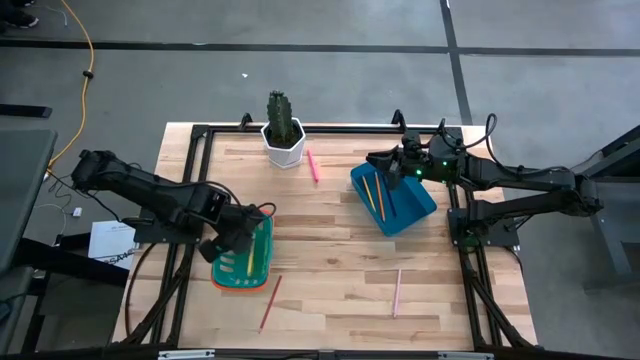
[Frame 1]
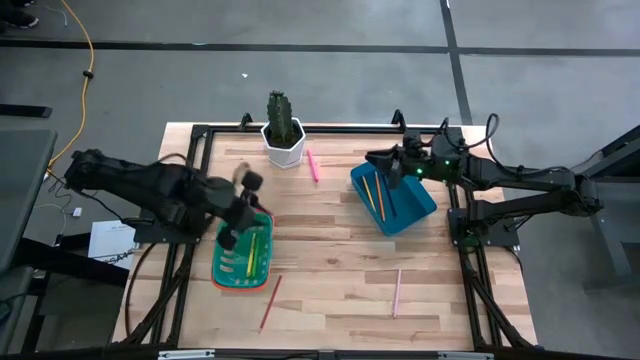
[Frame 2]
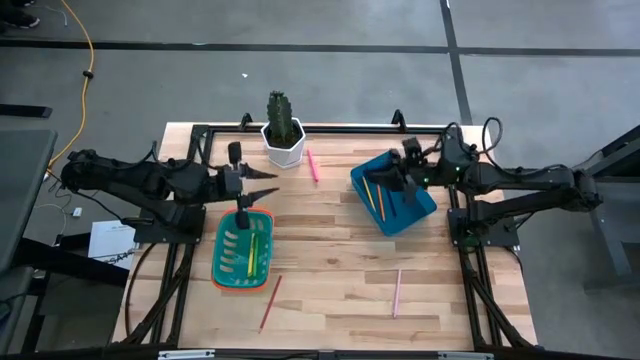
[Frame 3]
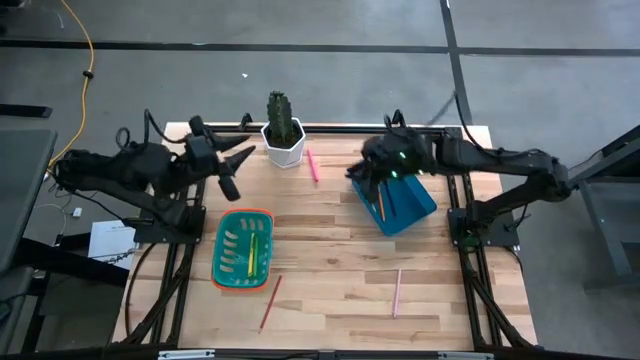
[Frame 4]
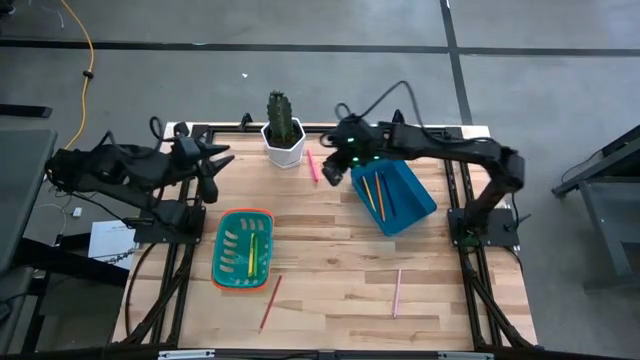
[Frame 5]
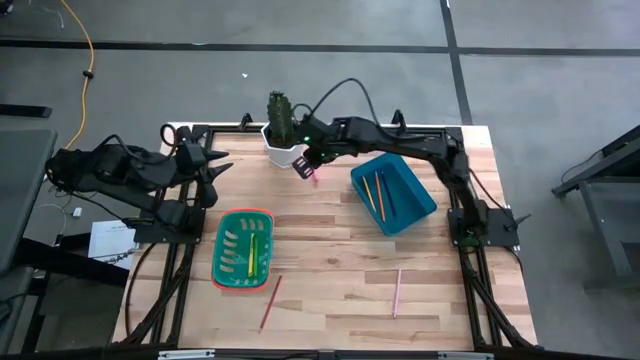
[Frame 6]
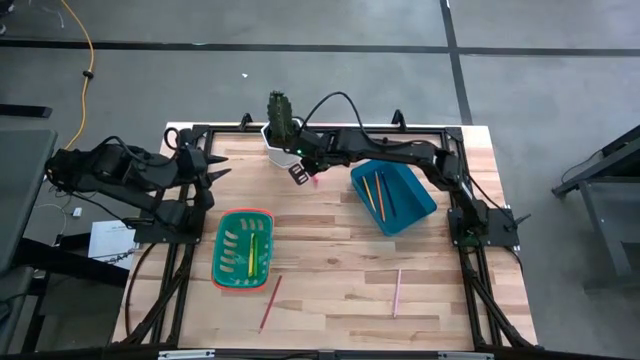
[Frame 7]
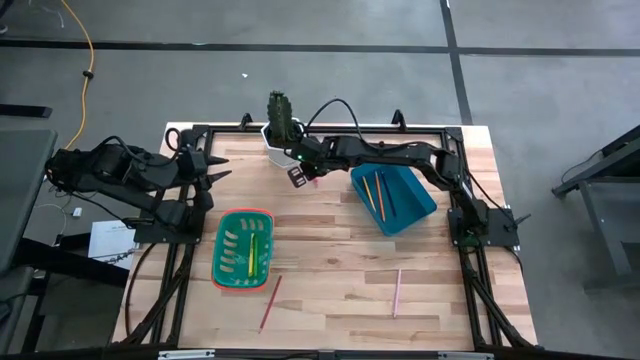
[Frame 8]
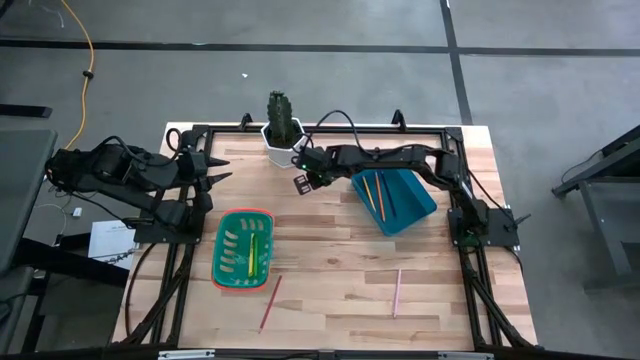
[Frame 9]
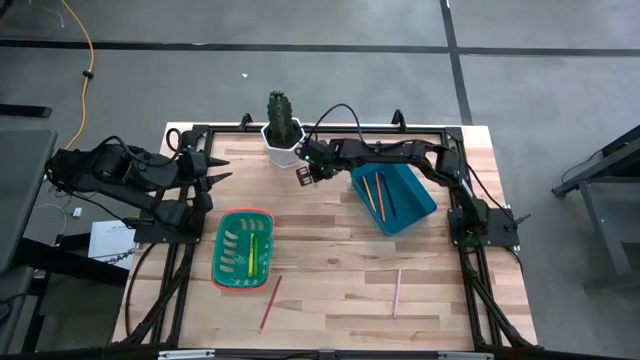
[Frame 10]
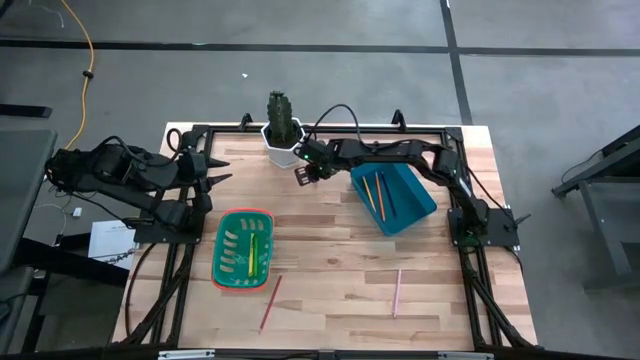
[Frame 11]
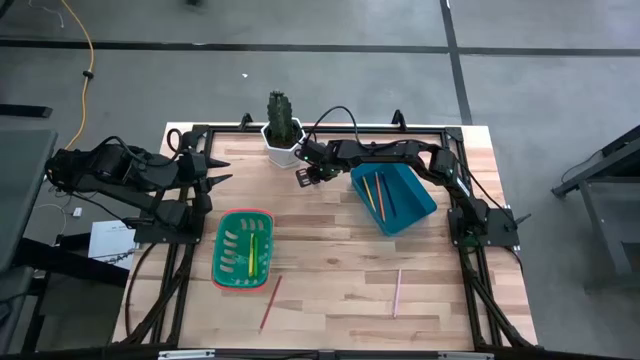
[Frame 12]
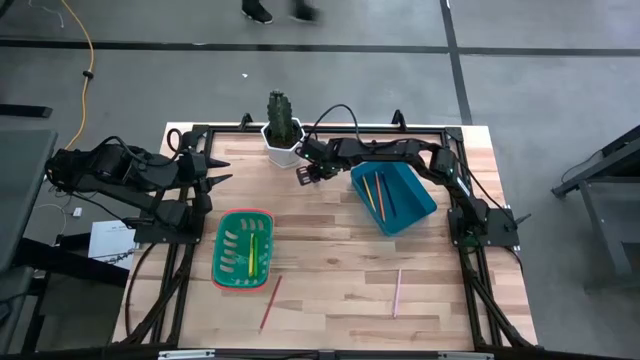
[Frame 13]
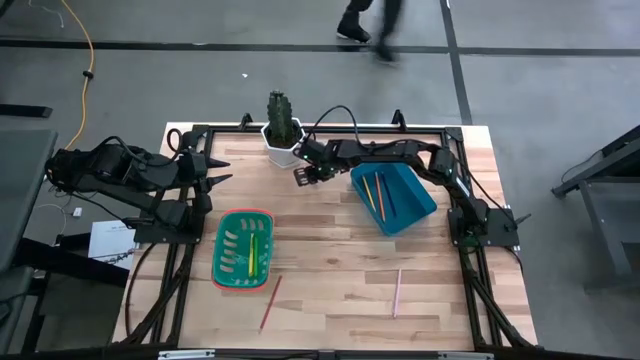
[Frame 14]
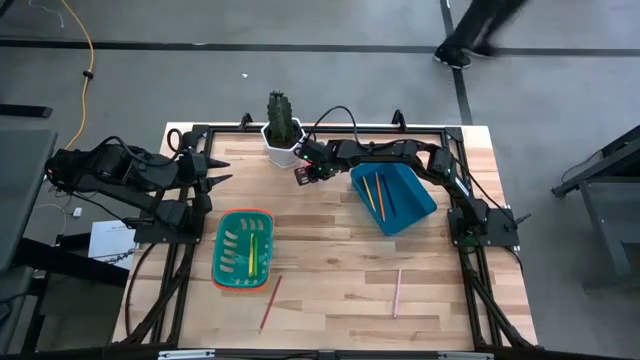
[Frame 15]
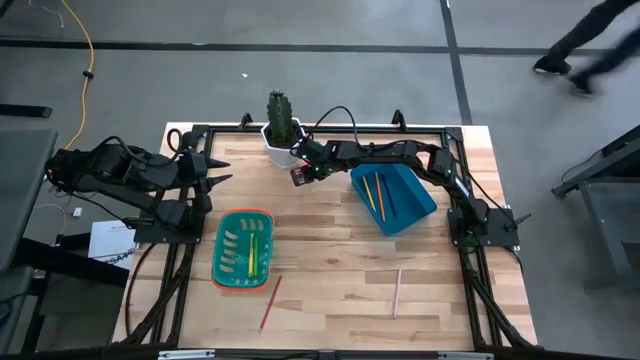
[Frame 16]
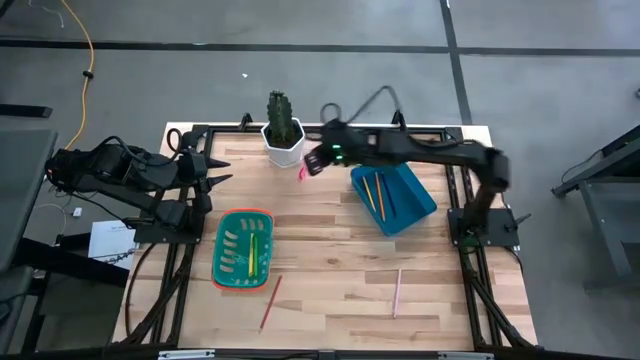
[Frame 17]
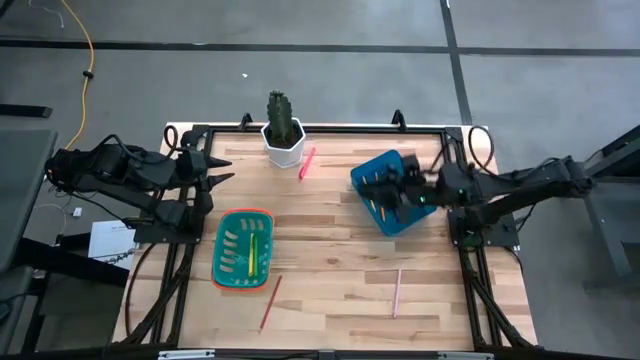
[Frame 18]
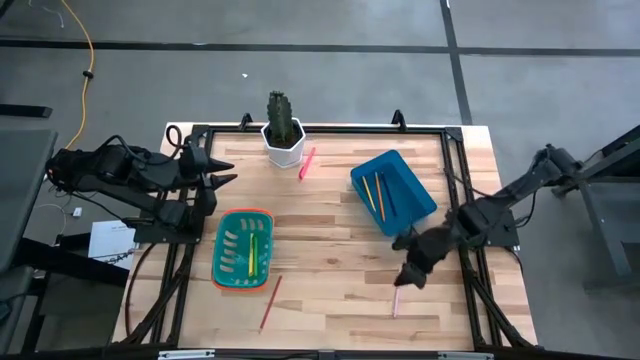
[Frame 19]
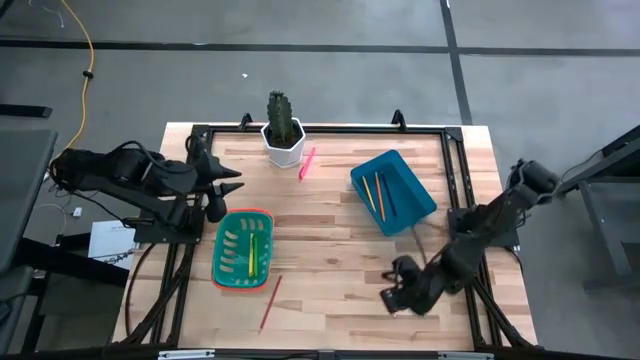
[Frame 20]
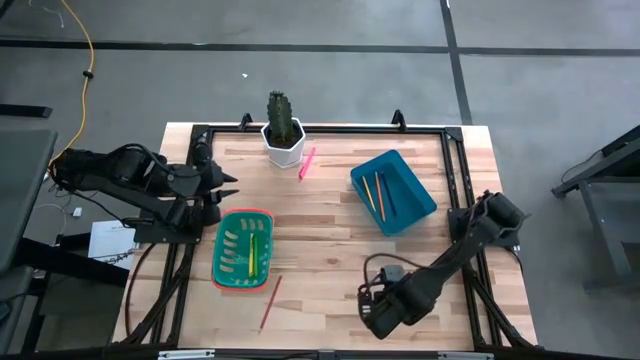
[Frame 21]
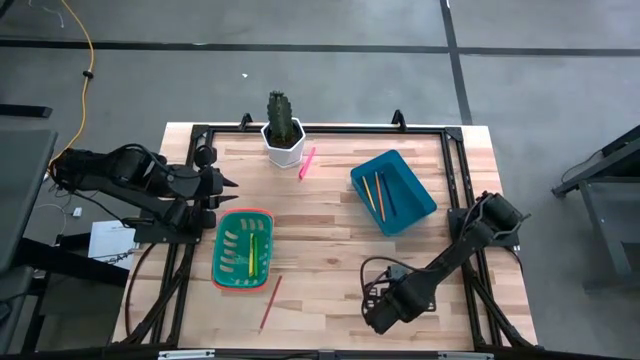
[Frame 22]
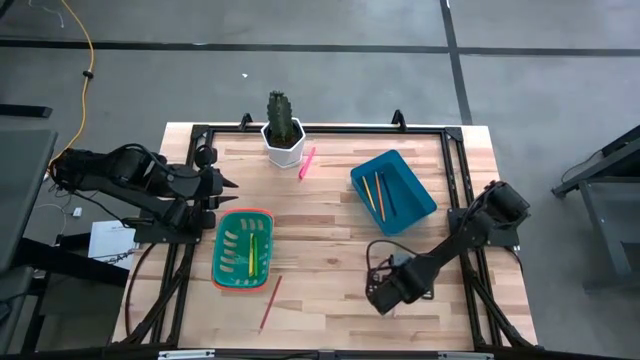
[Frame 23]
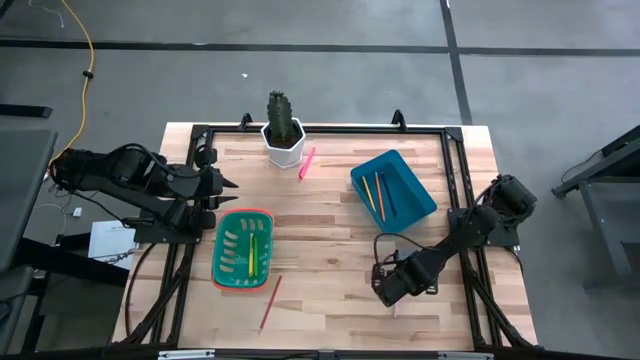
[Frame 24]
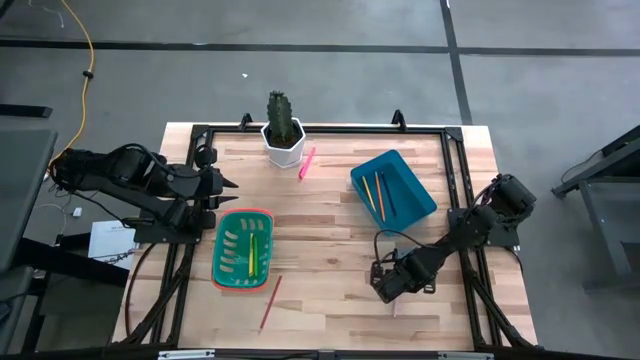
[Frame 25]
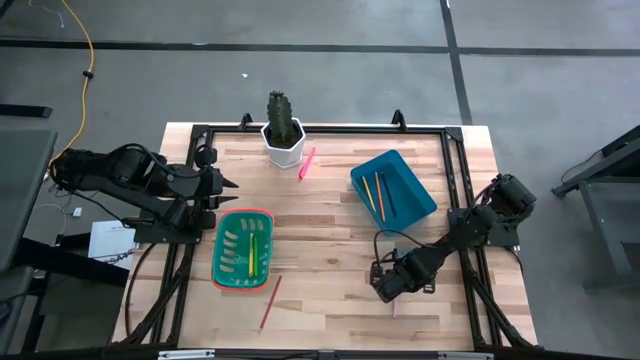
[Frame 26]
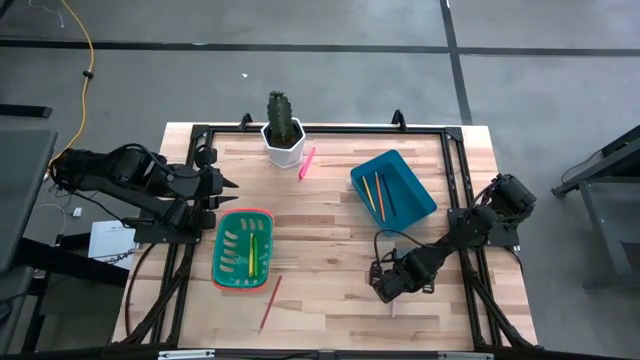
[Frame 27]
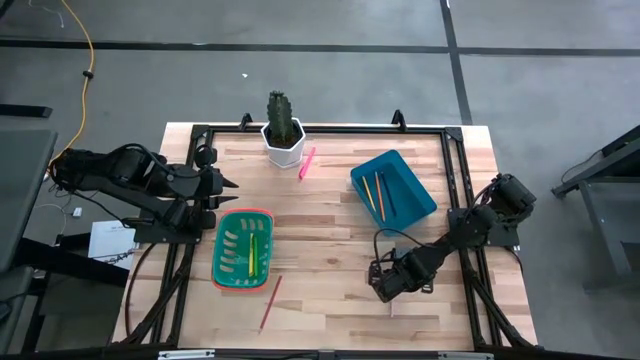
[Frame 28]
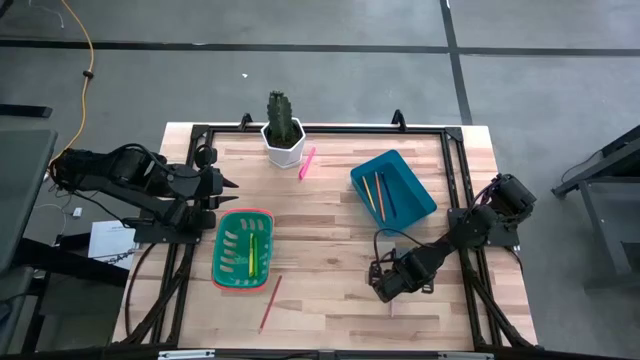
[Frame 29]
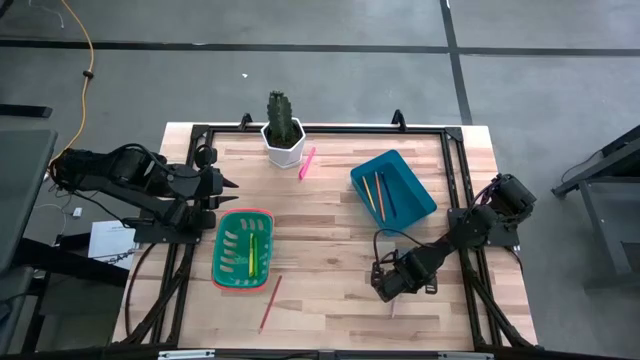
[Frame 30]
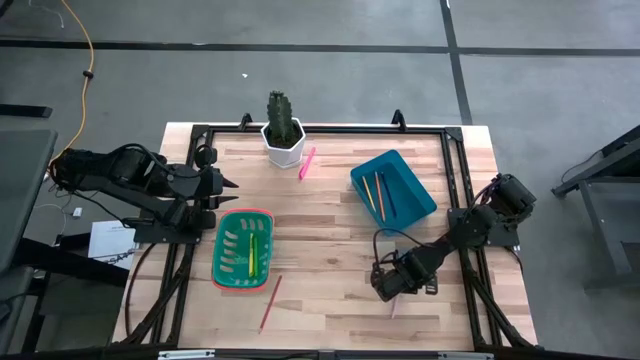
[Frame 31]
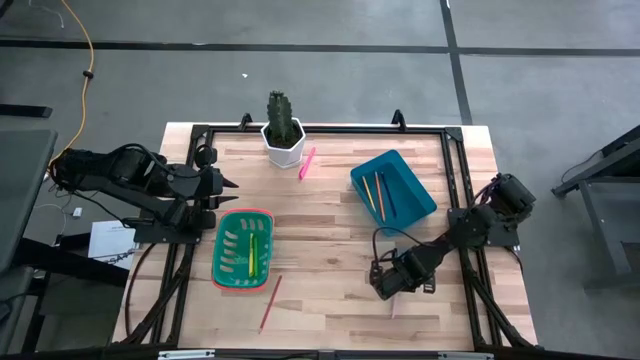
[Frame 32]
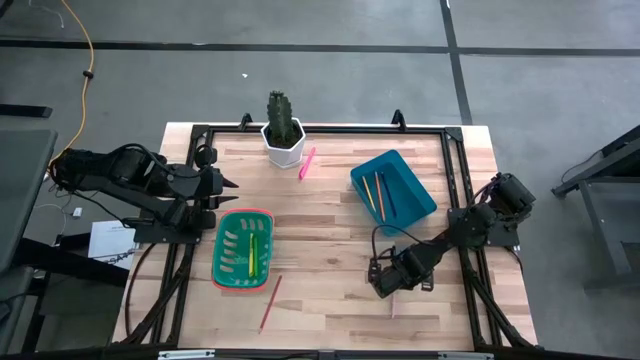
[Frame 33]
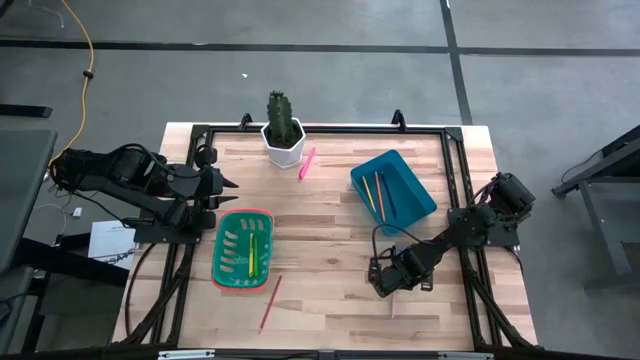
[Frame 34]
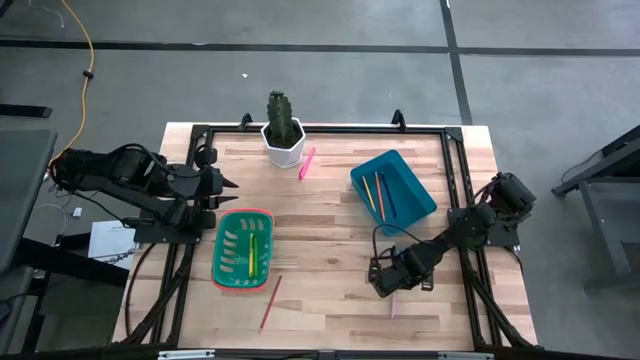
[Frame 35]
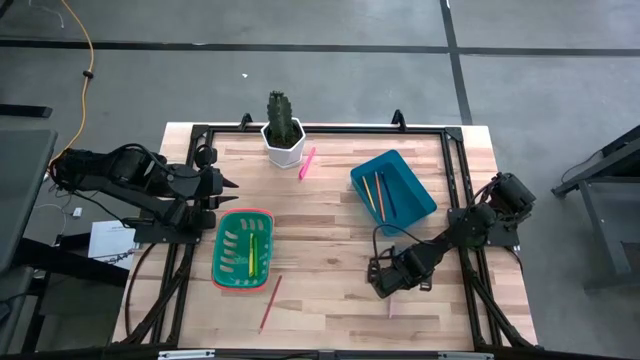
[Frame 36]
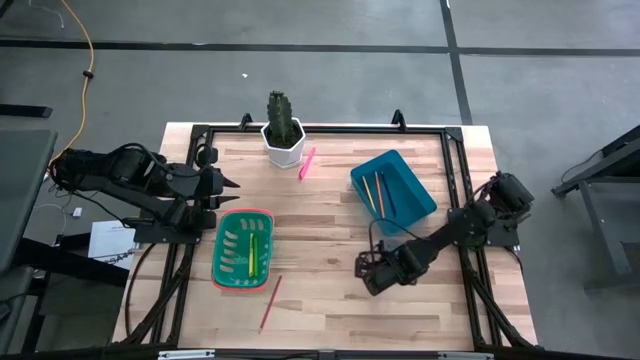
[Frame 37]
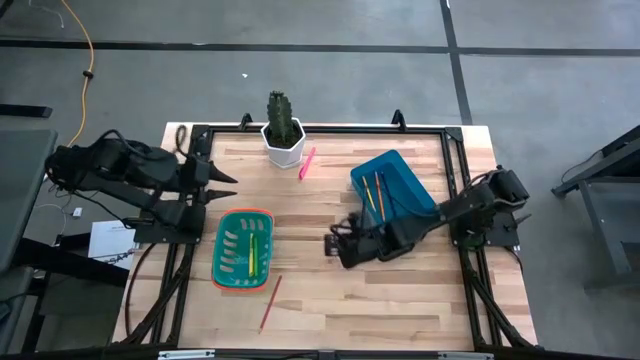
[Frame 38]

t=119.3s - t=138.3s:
Task: Sort pens & pencils
Put the light pink pen into the green basket
